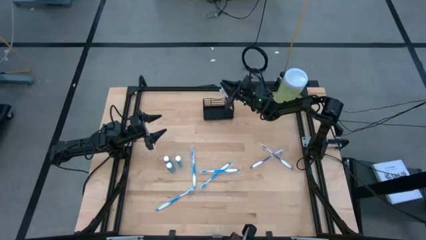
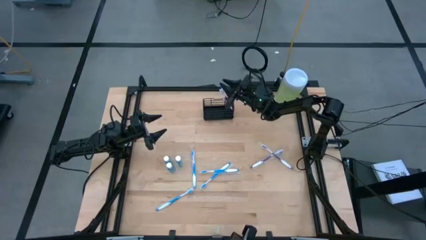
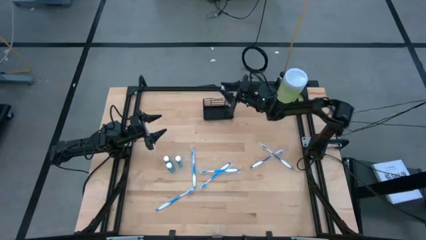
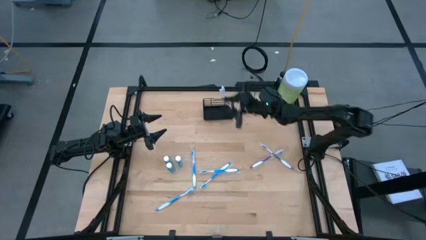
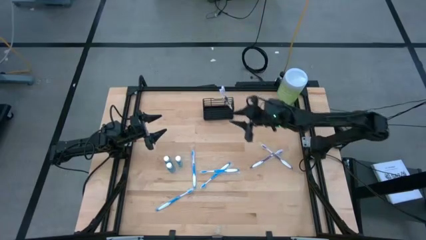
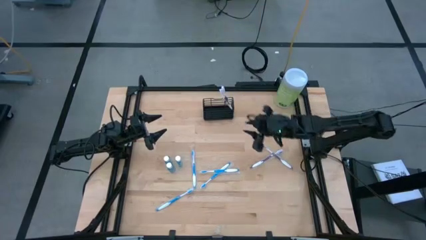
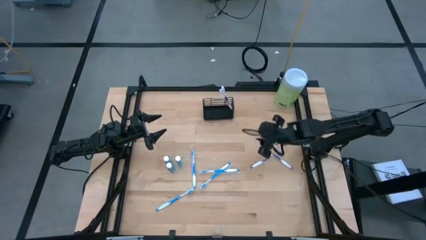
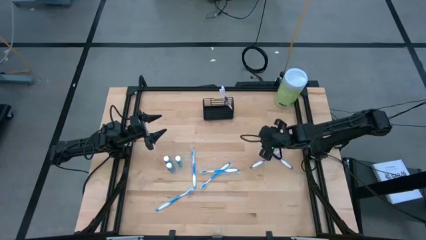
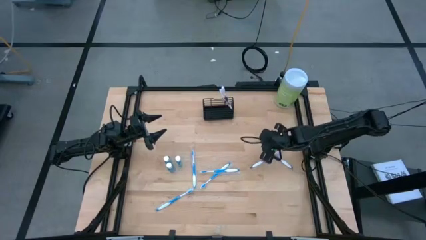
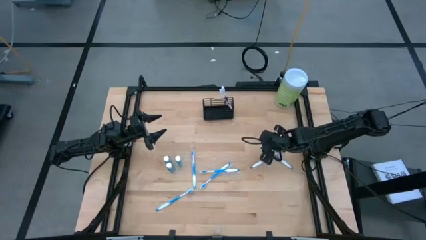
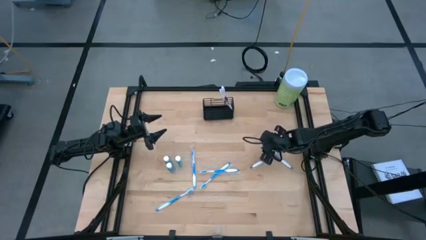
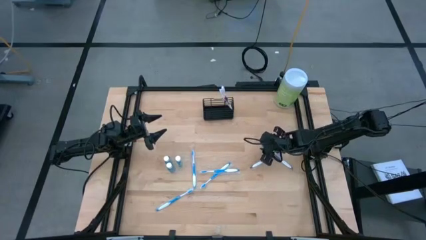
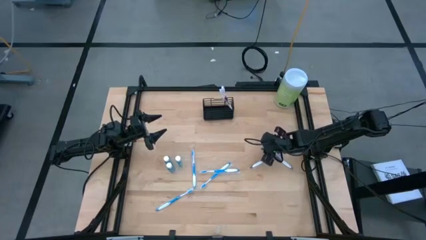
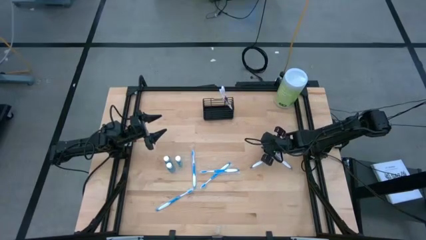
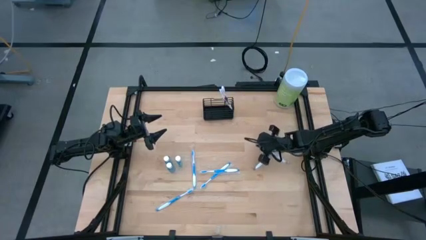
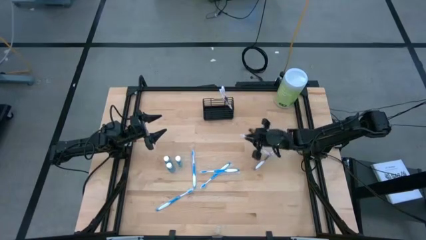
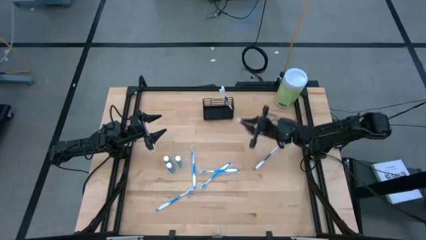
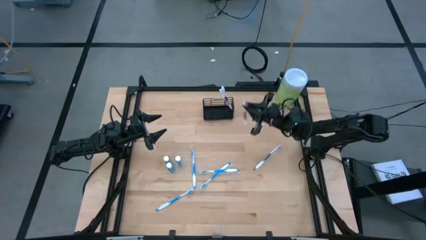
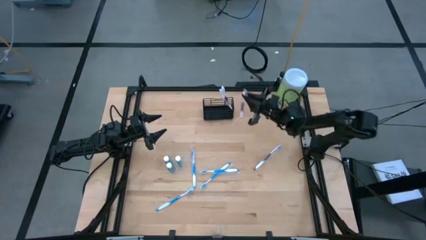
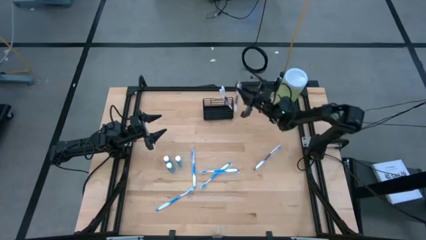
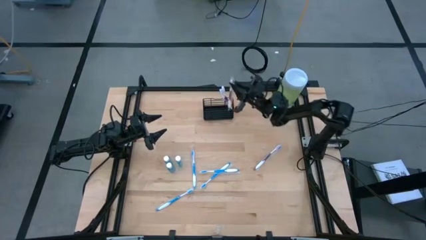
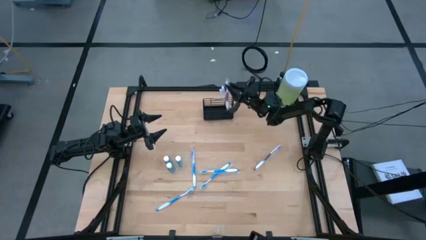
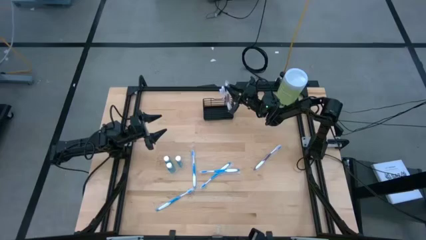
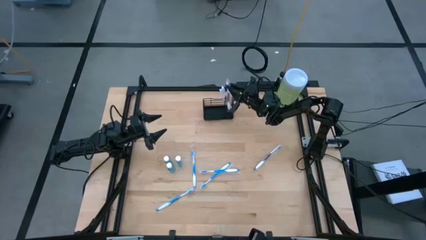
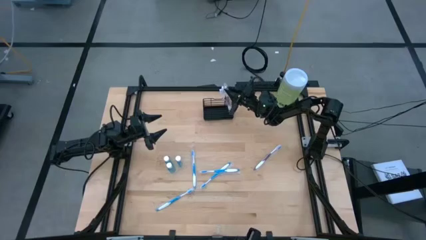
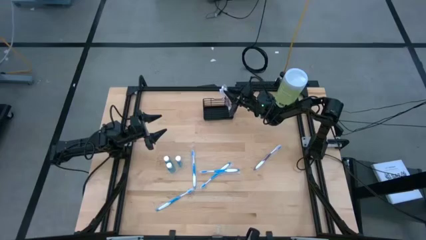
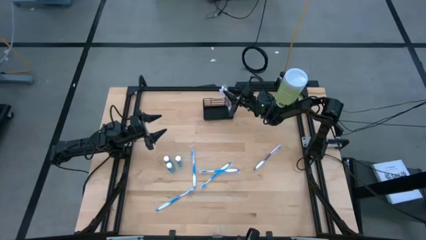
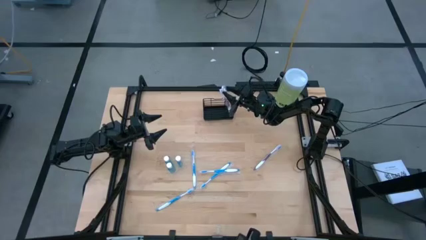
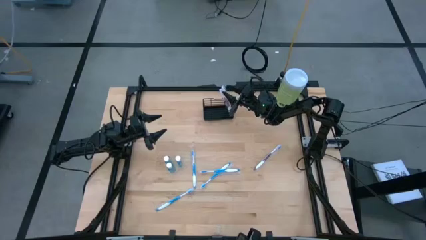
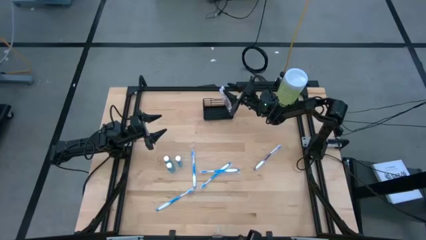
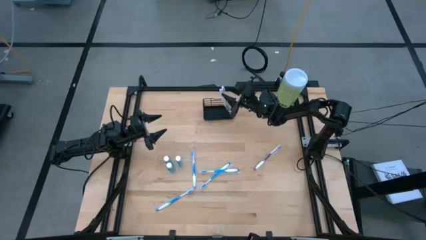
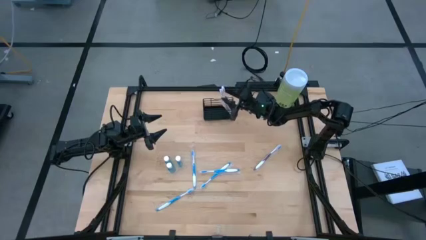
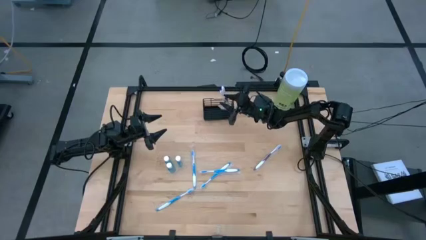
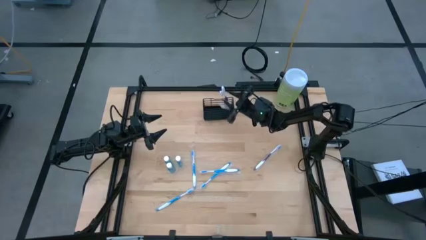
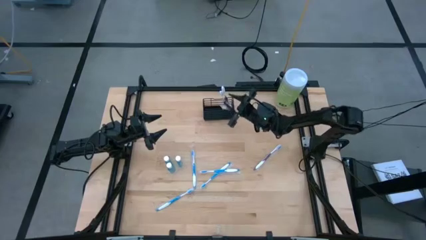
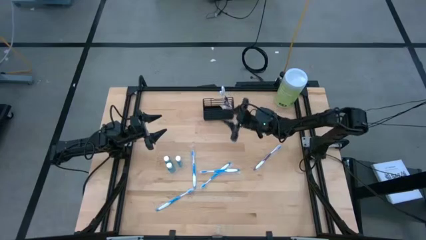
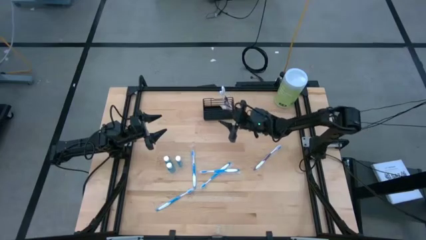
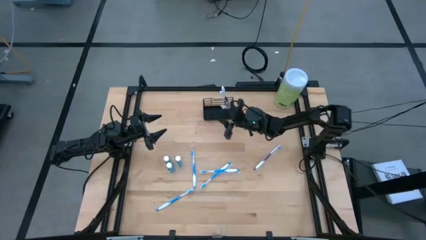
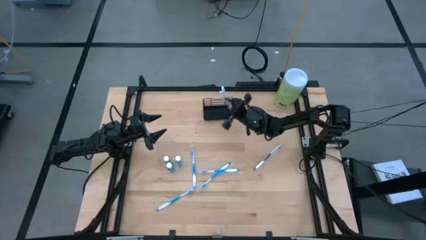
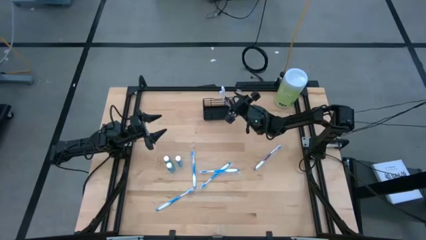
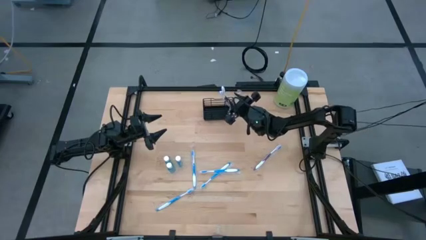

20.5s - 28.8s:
Task: Pick & Place toothbrushing station
Put the violet toothbrush into the right compartment of the wire organizer

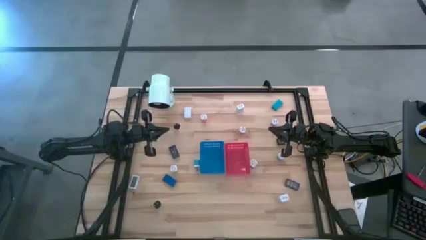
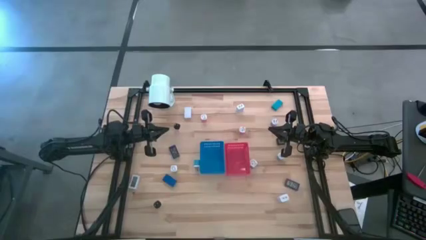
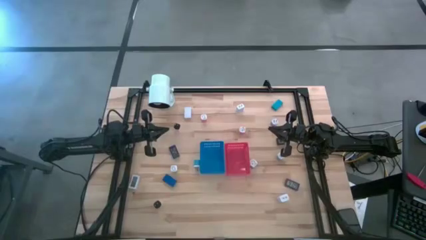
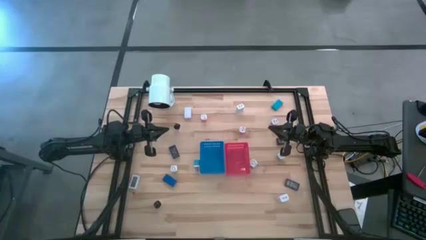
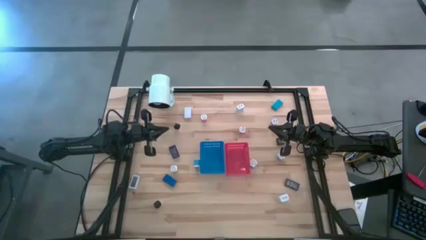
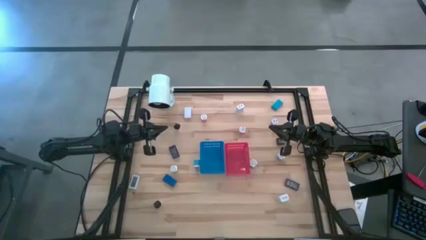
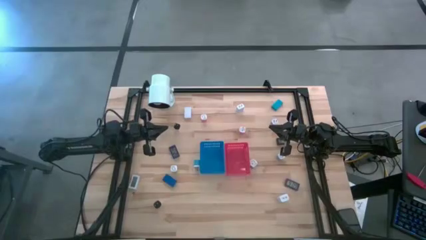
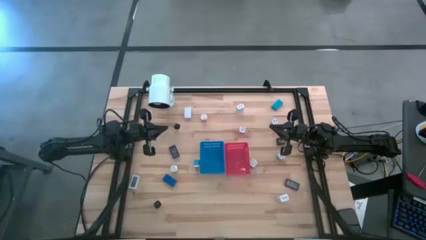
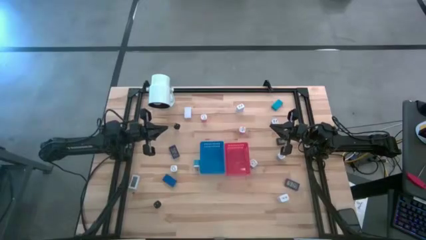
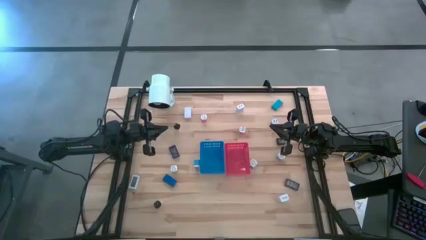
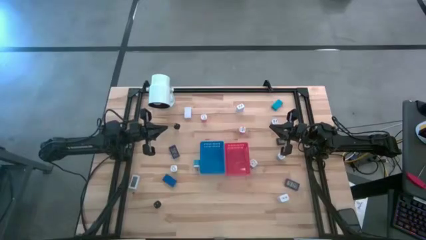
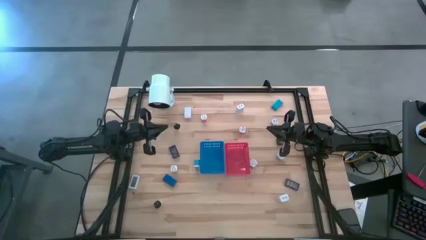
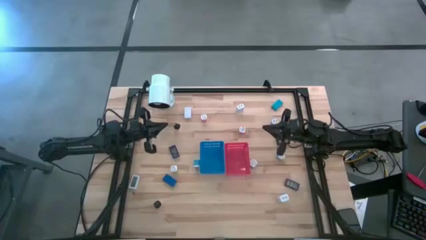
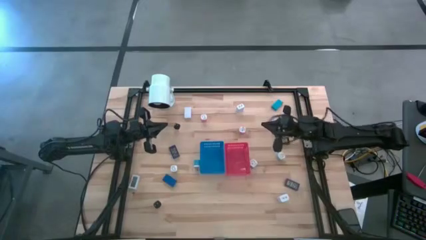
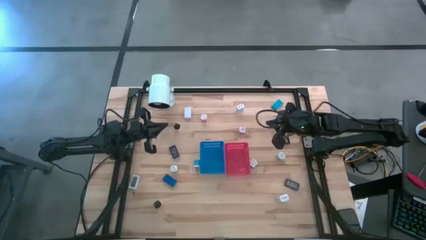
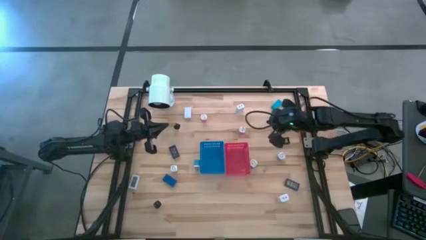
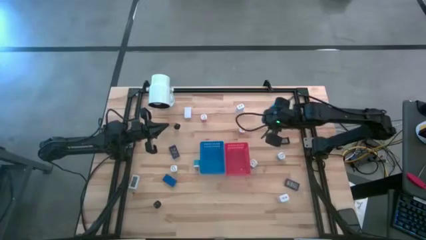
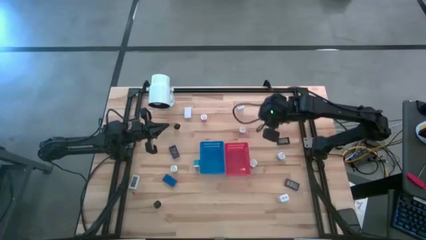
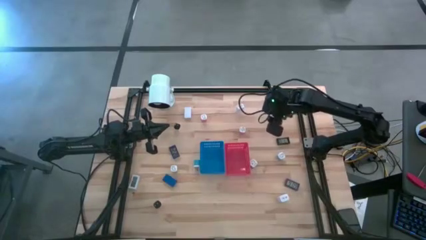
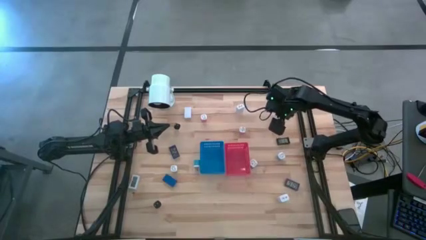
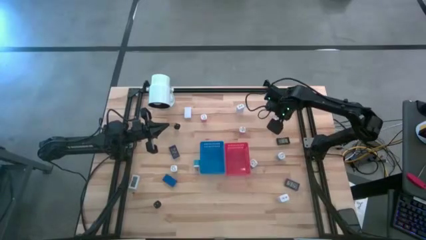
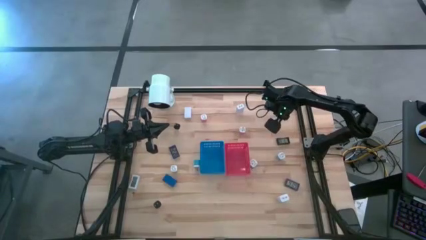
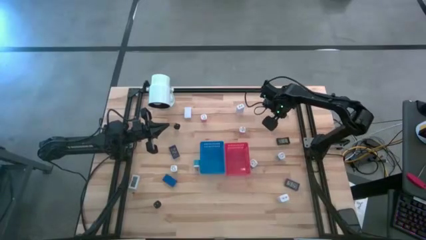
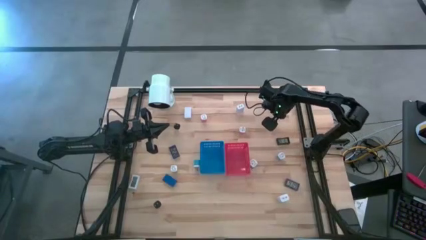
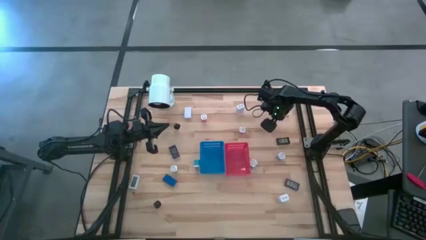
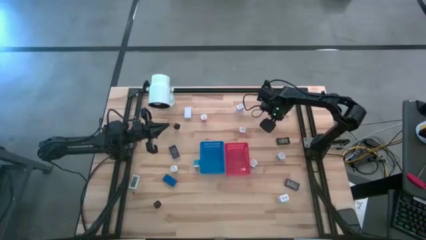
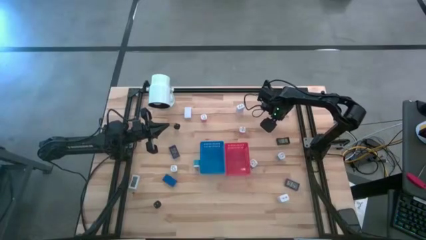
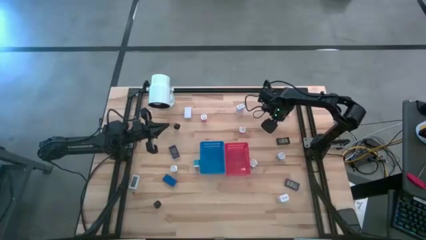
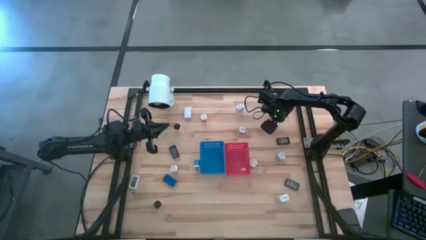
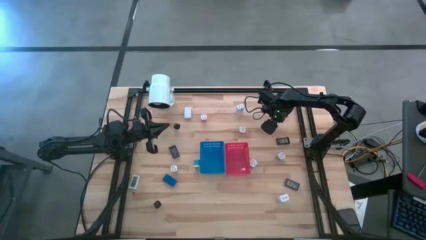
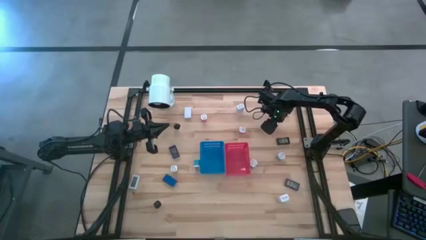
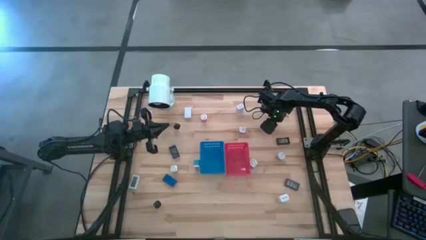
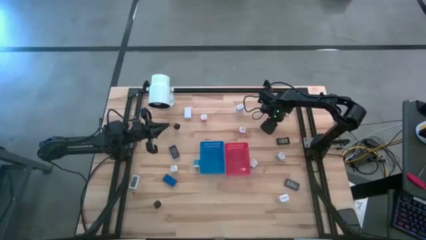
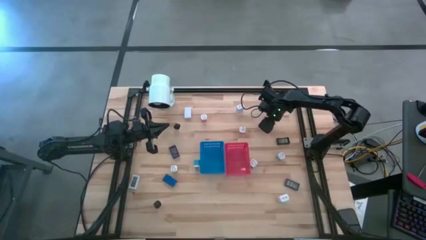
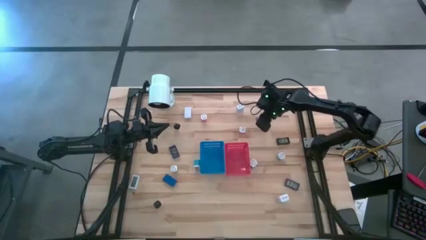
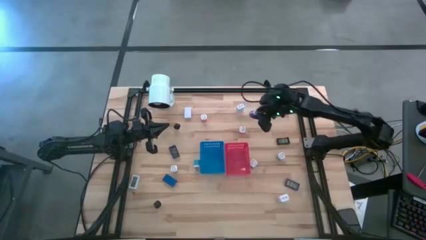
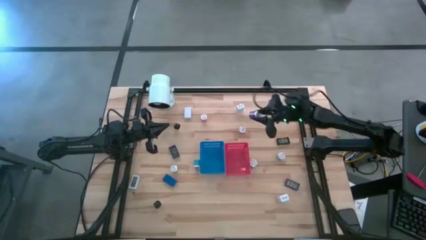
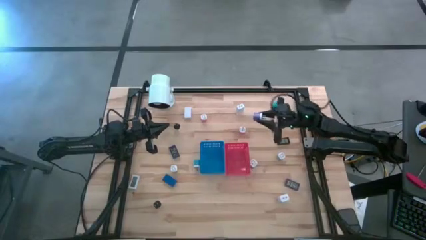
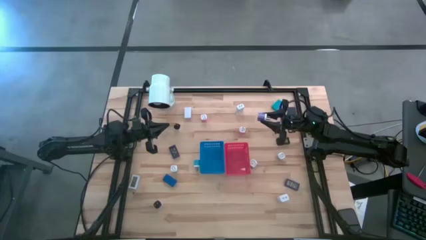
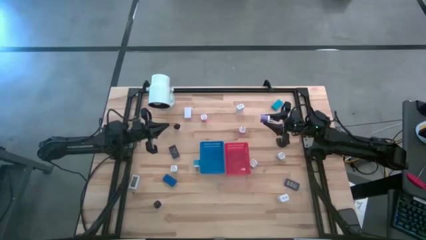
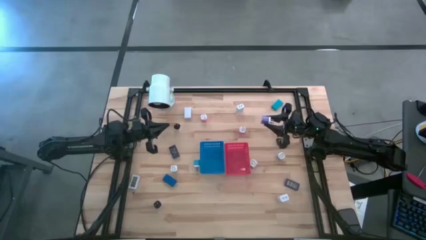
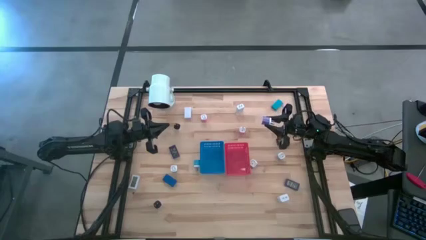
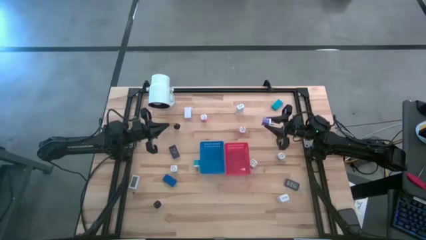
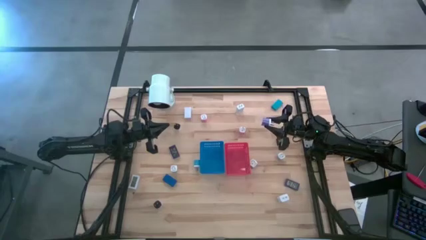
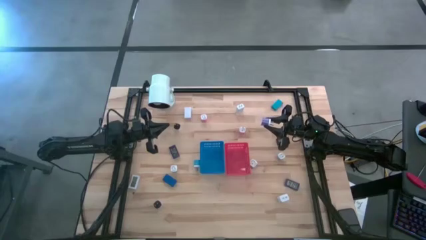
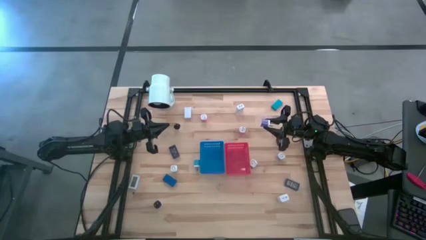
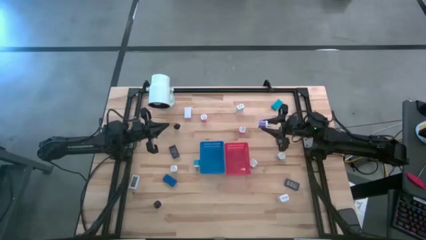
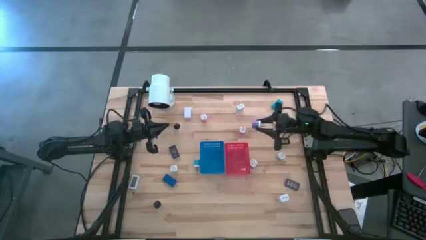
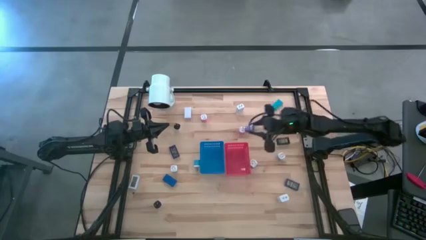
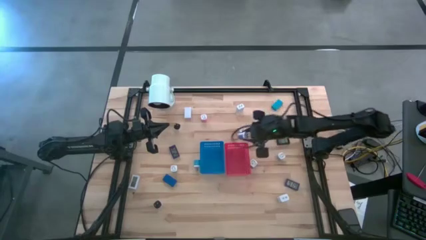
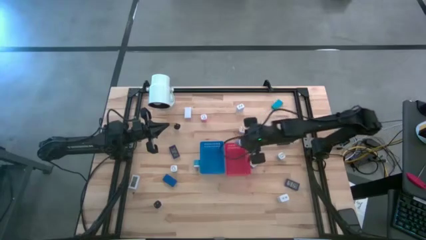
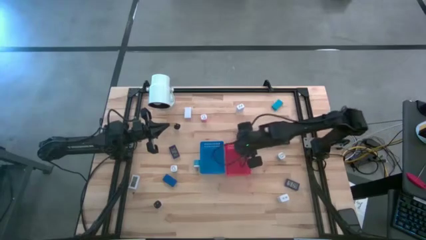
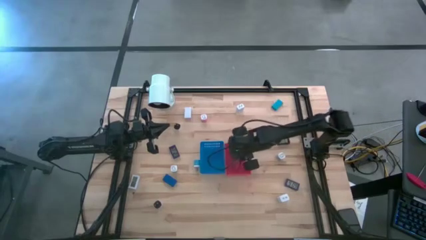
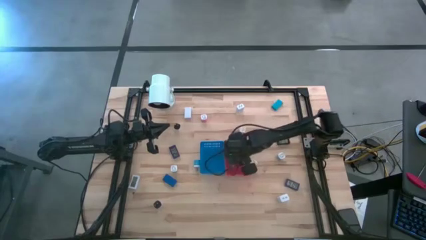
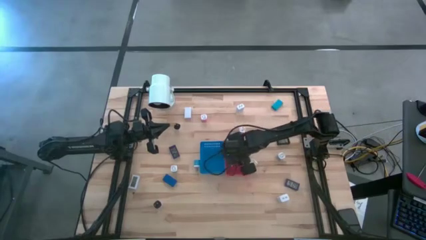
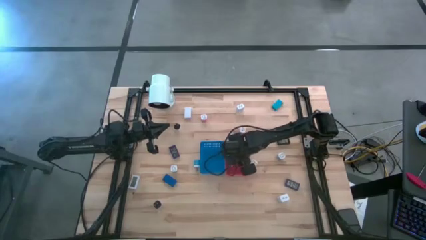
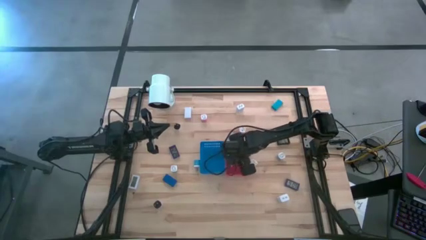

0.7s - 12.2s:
Task: Sort adapters and digital timers
Put the purple charger adaptor into the red bin
